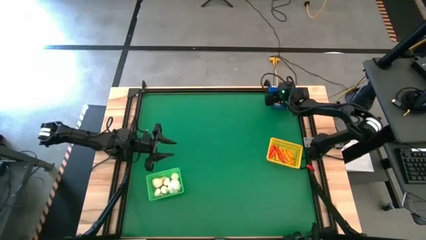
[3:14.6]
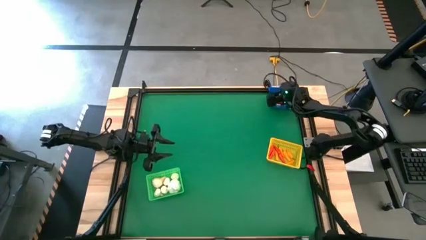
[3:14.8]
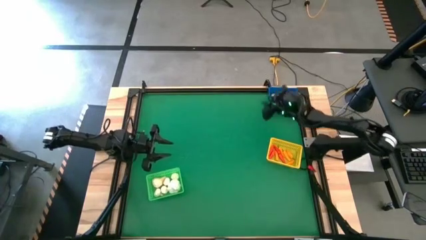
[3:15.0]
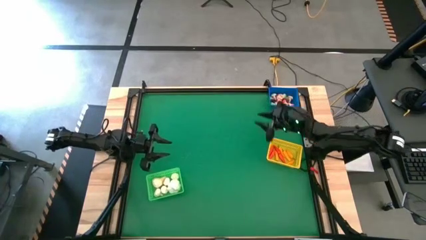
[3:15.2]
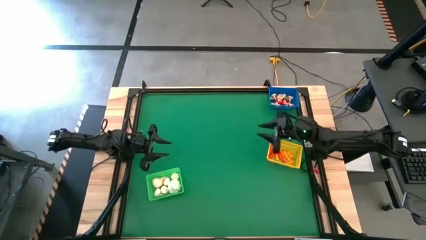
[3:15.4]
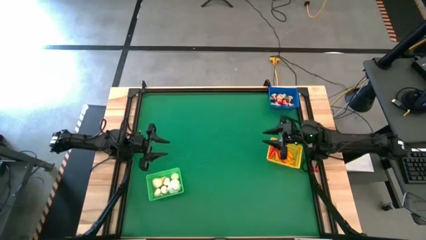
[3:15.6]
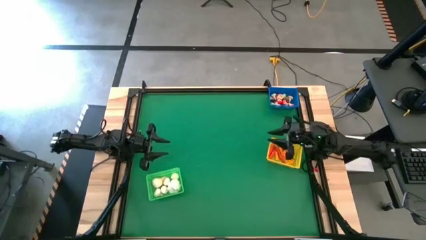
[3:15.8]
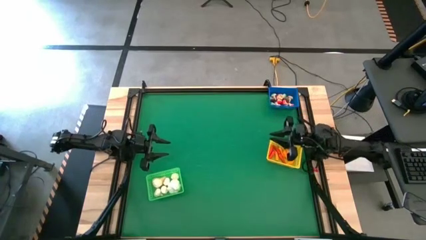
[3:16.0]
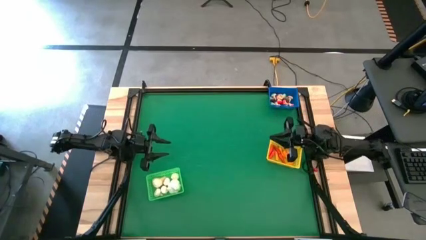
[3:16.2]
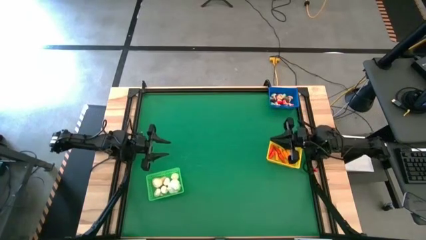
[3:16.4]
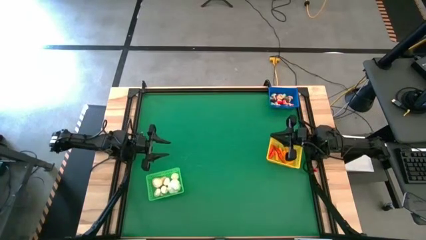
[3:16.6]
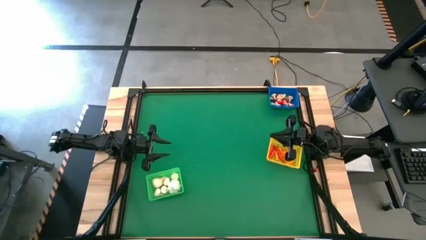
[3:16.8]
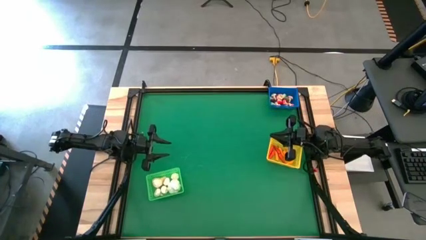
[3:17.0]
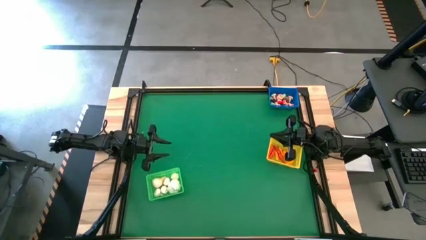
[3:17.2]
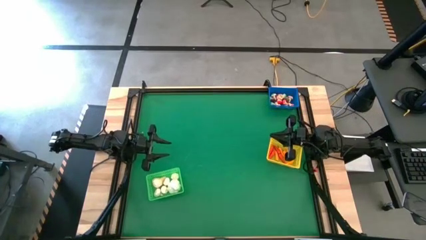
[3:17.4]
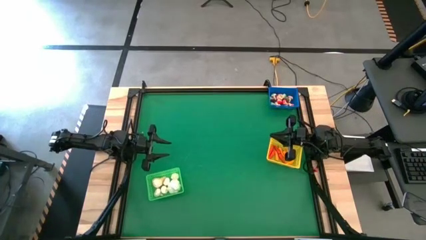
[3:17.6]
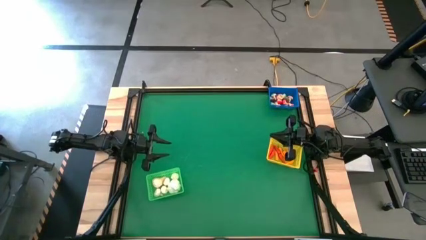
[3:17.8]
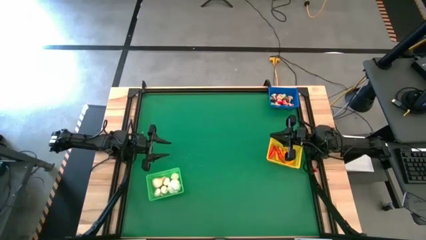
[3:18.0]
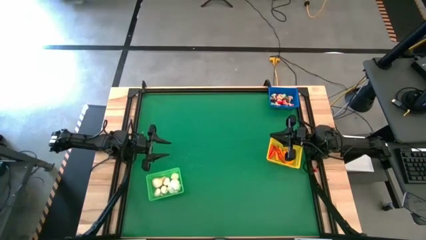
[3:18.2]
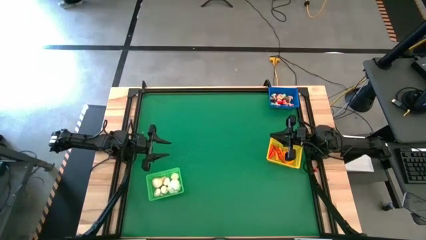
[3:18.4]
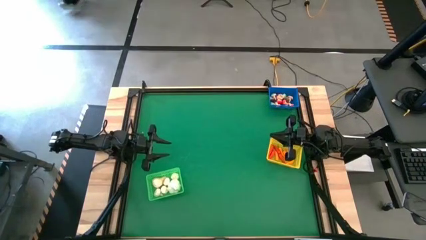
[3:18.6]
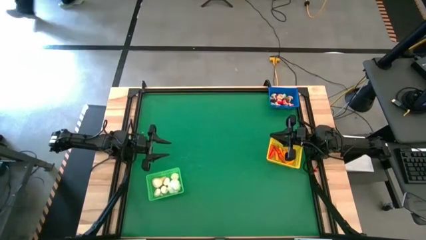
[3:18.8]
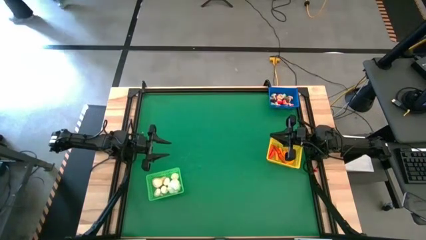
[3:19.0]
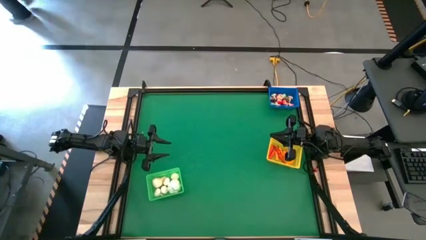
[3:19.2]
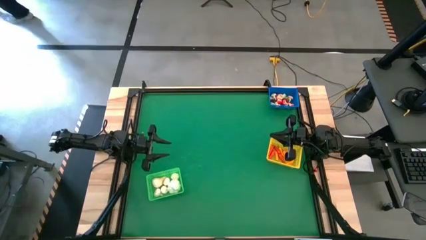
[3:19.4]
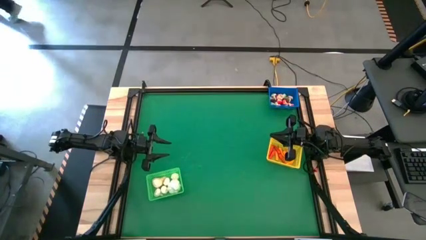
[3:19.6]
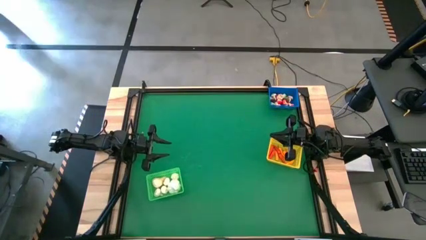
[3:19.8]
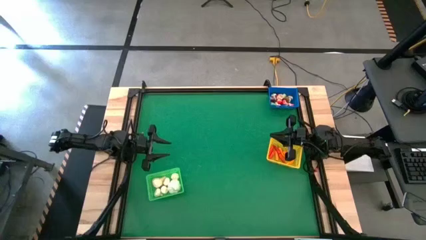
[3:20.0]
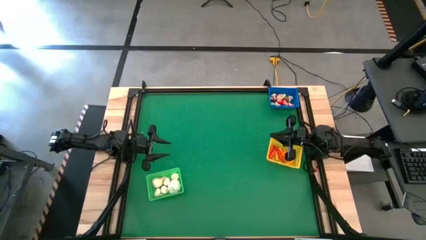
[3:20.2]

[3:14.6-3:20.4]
Task: Sort produce into baskets
Return to Home Position

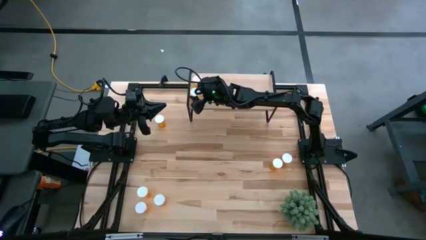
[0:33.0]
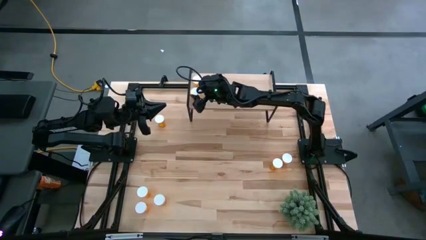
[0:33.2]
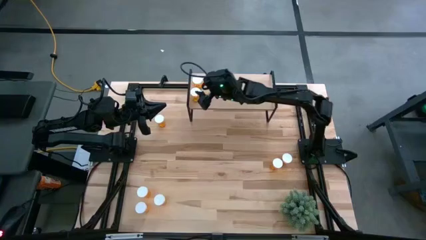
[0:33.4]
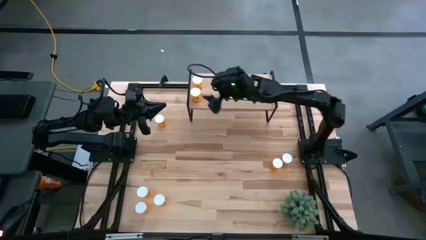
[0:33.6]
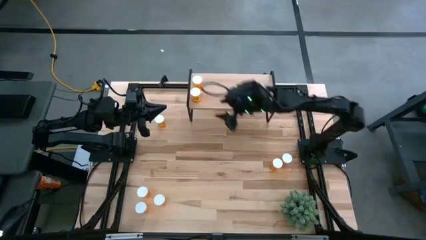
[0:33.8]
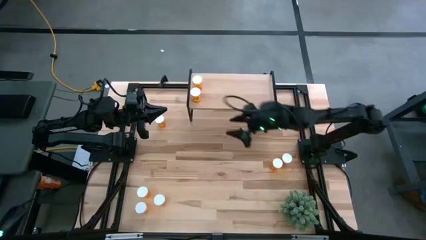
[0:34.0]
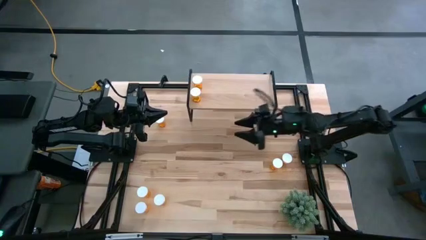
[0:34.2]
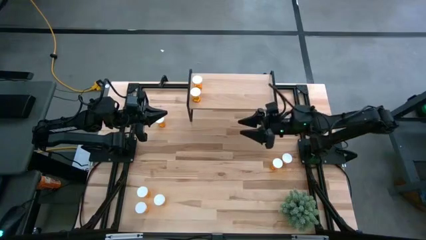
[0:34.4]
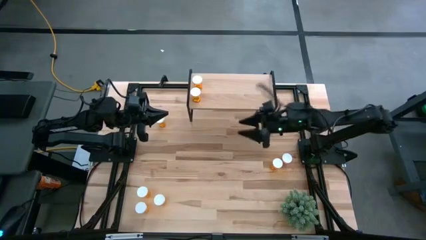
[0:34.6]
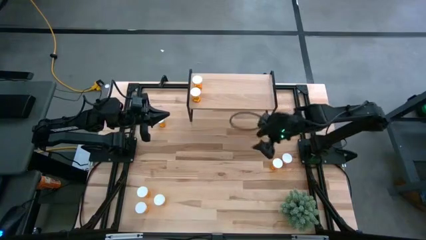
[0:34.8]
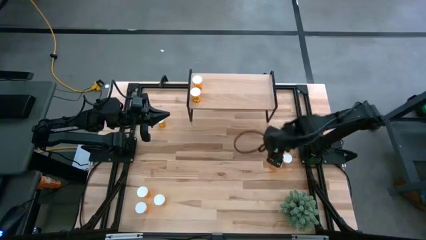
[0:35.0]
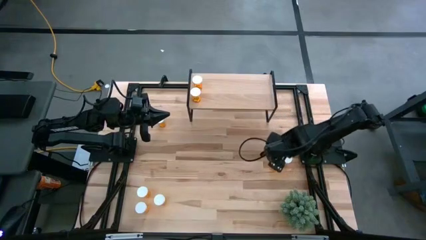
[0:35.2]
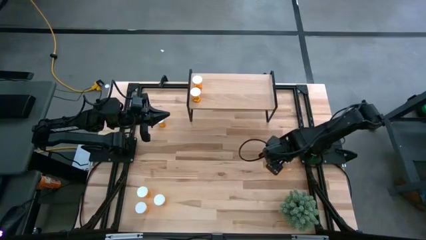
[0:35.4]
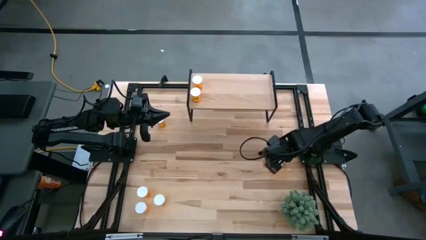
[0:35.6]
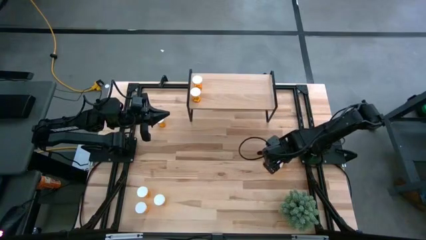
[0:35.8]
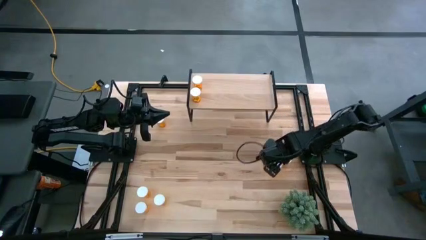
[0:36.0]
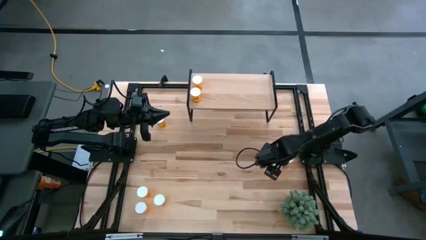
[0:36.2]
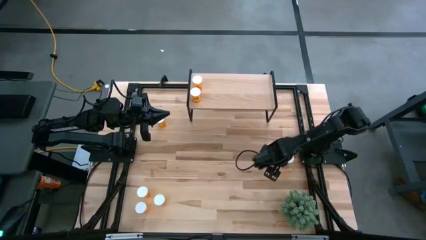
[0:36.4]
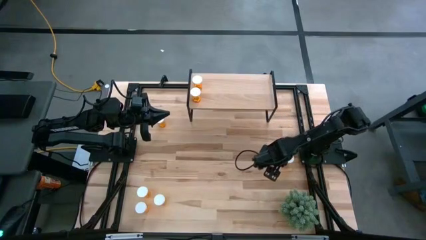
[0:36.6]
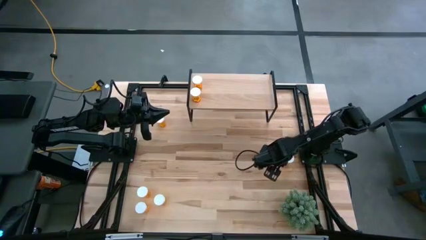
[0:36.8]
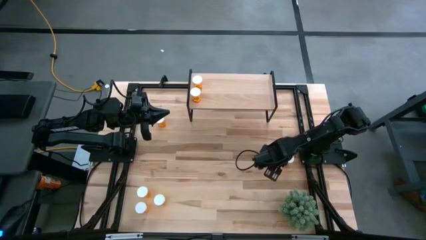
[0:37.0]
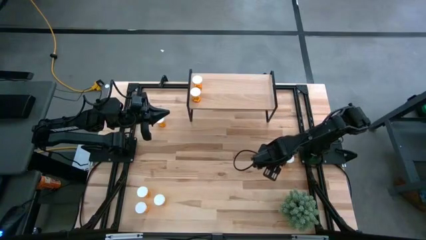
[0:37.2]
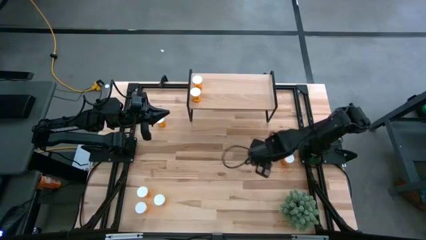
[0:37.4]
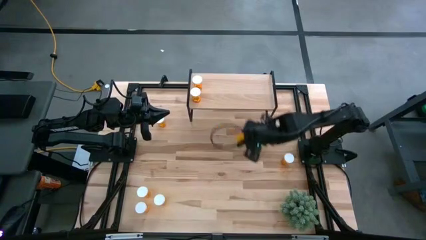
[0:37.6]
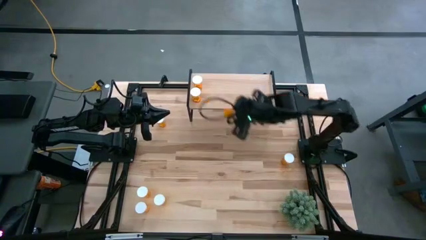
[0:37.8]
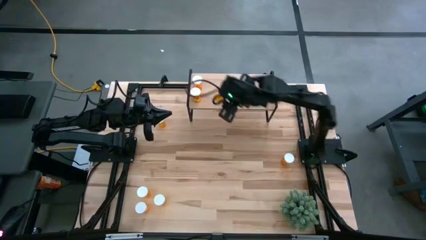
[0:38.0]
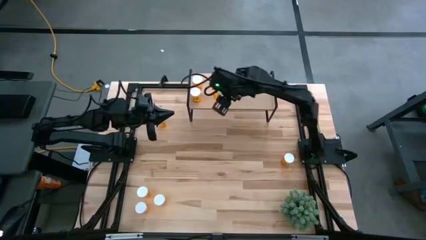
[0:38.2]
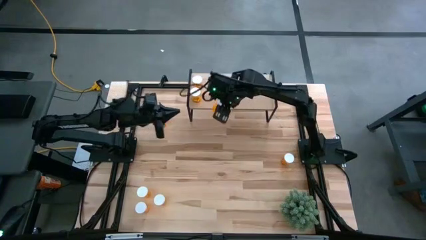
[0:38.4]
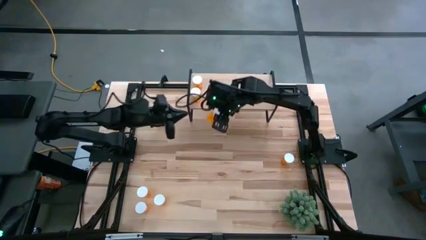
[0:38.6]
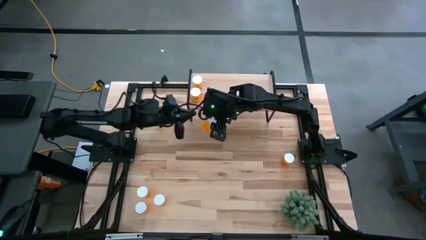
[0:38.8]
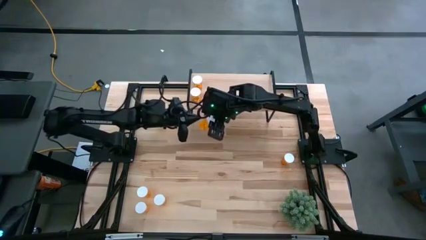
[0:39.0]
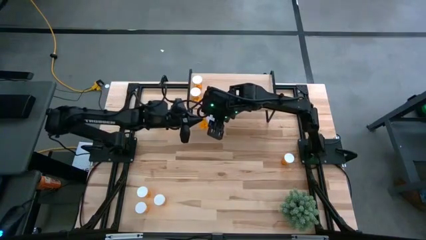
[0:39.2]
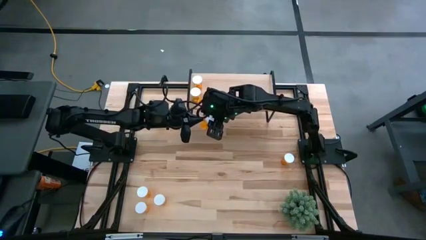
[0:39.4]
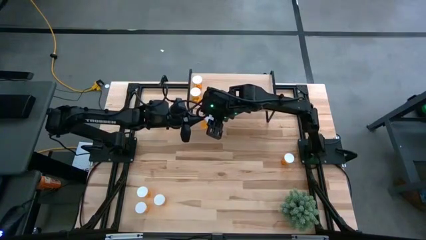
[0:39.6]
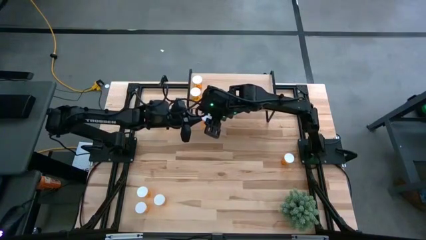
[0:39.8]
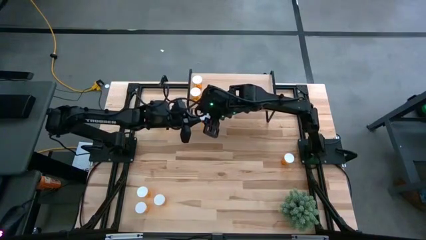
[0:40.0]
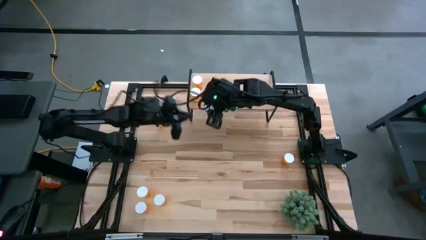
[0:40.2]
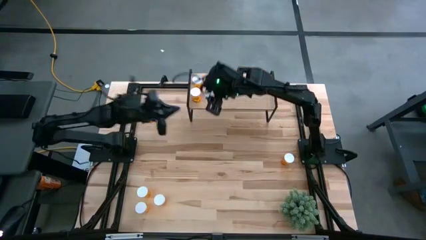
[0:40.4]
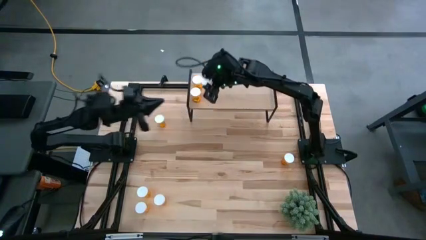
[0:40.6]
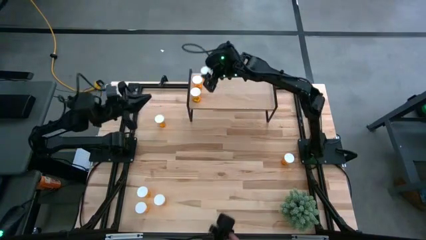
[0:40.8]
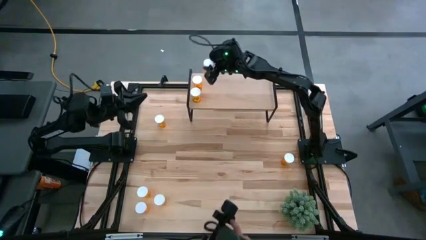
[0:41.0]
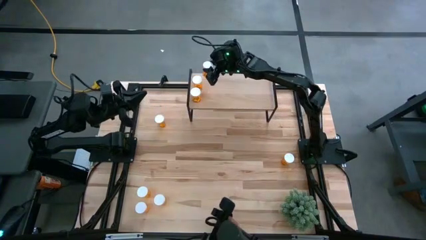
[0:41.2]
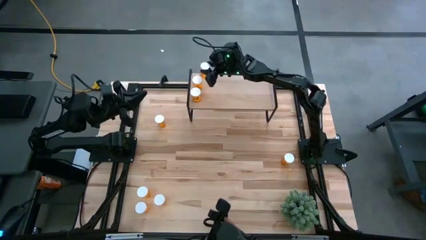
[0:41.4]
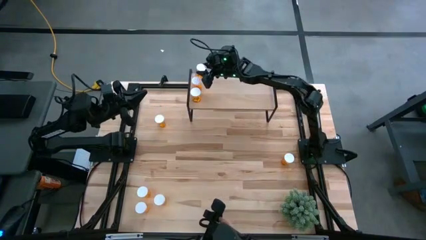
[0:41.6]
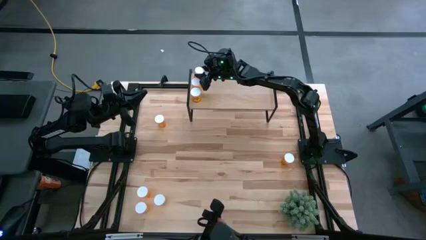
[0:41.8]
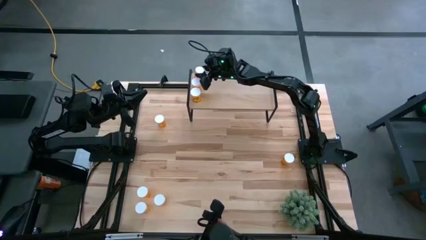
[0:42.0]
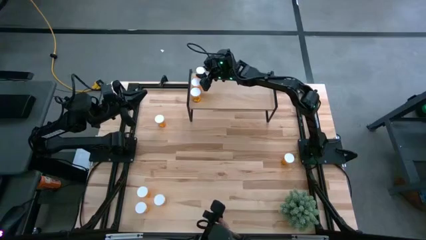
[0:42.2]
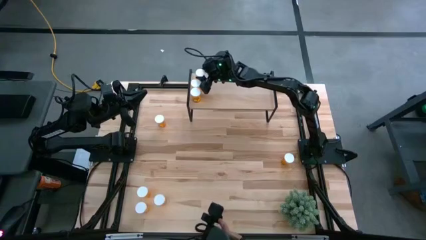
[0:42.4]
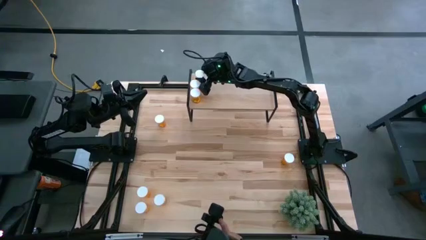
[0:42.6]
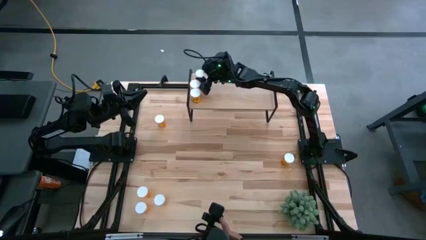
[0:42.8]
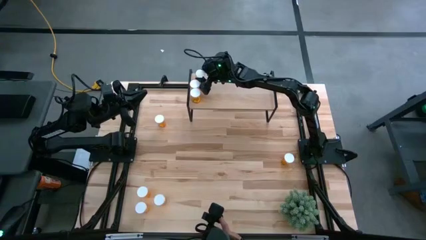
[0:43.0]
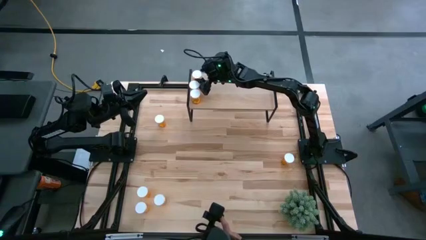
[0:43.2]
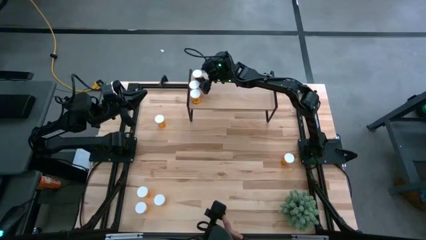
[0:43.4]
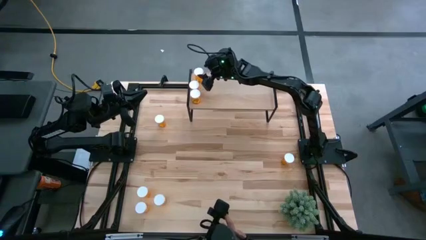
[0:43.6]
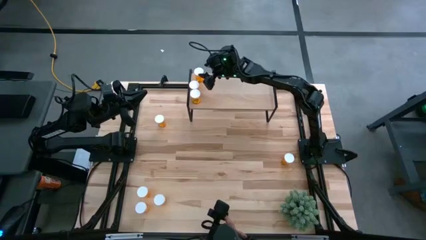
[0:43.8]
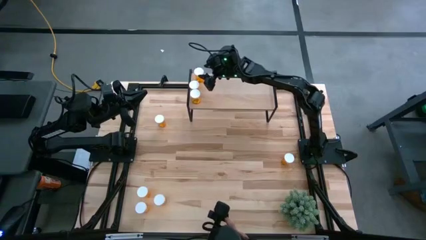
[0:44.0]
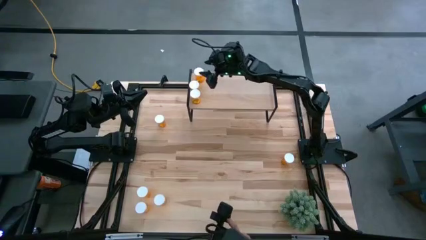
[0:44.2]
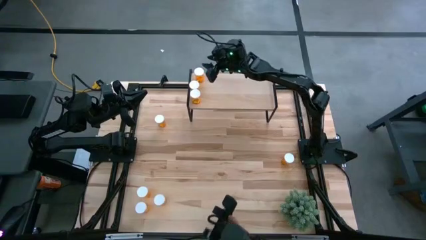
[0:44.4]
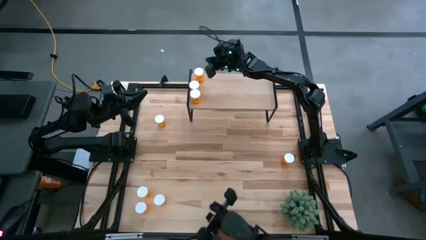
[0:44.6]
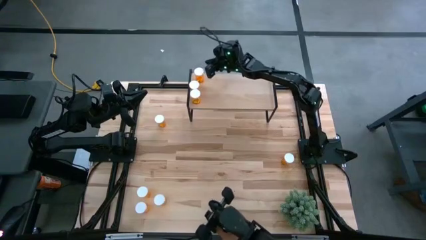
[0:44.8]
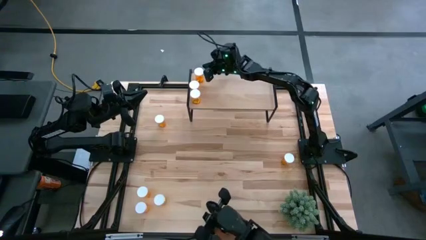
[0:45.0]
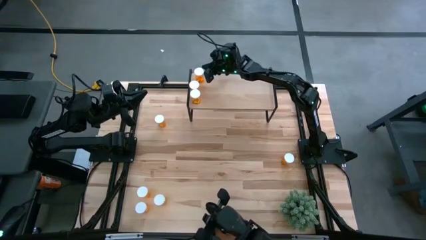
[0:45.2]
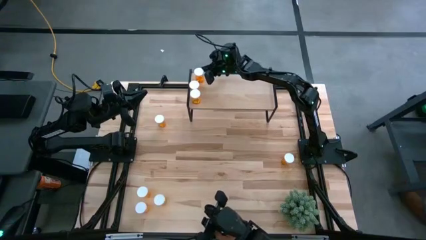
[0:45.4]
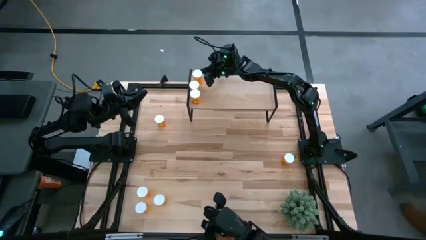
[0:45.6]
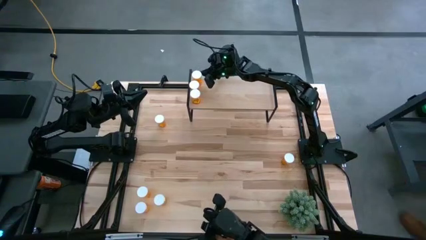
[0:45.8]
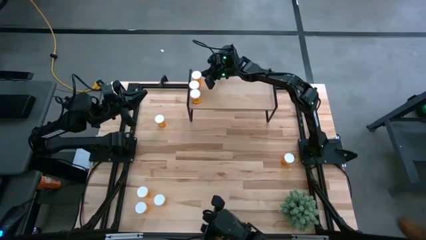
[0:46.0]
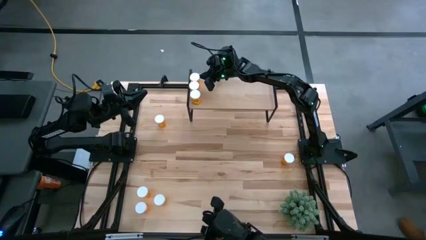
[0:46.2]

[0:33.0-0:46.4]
Task: Pick and place medicine bottles onto shelf by color
Put the orange pill bottle on the shelf aligned with the other orange pill bottles
